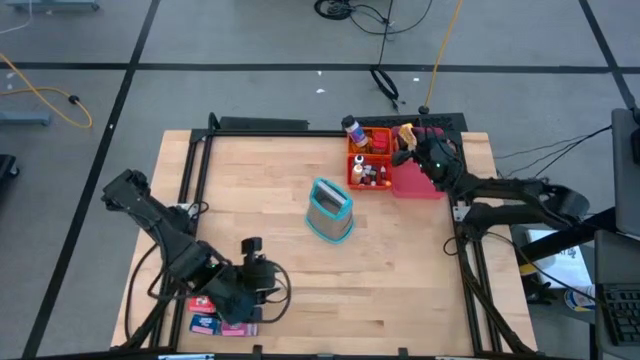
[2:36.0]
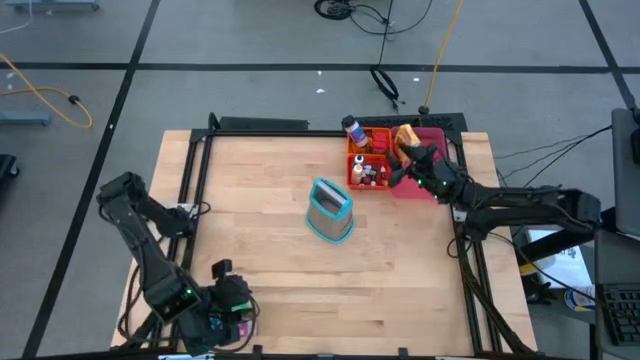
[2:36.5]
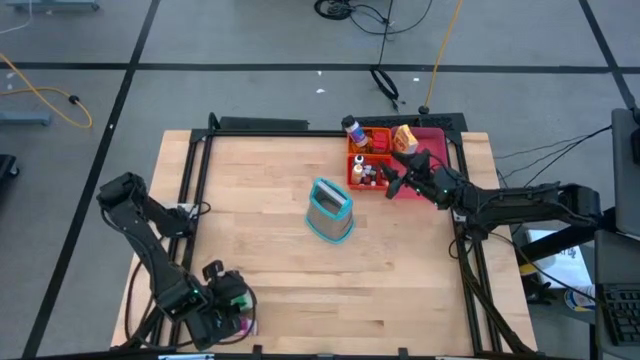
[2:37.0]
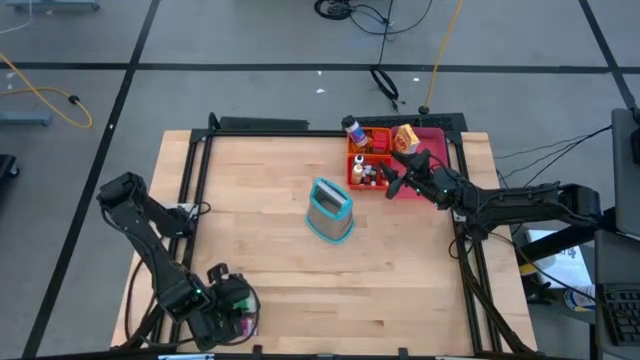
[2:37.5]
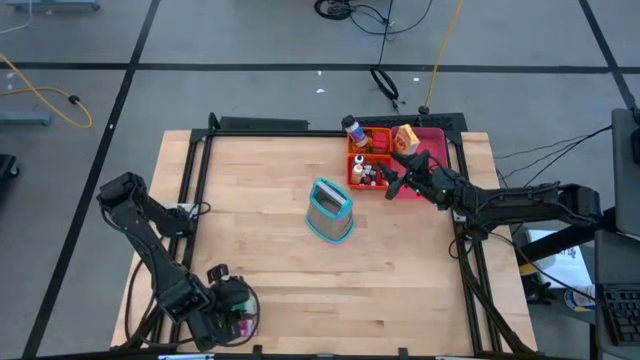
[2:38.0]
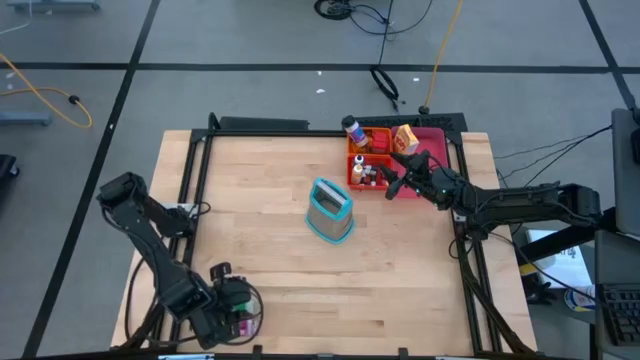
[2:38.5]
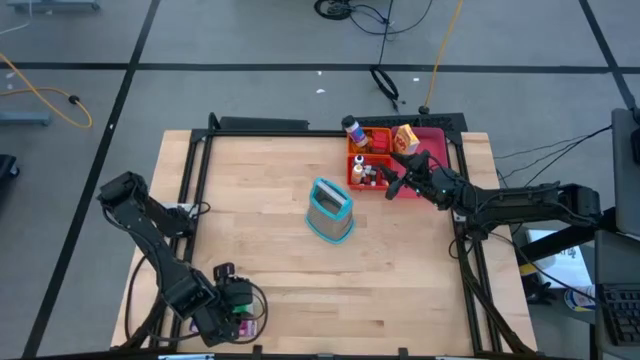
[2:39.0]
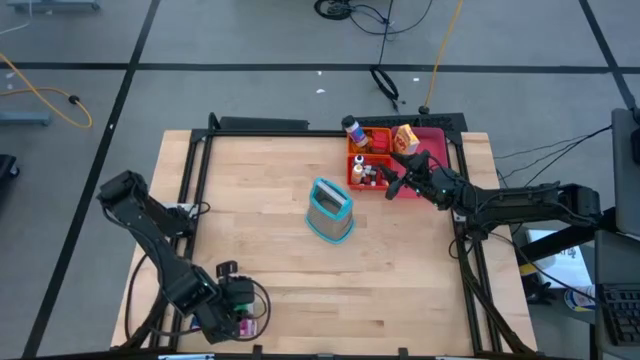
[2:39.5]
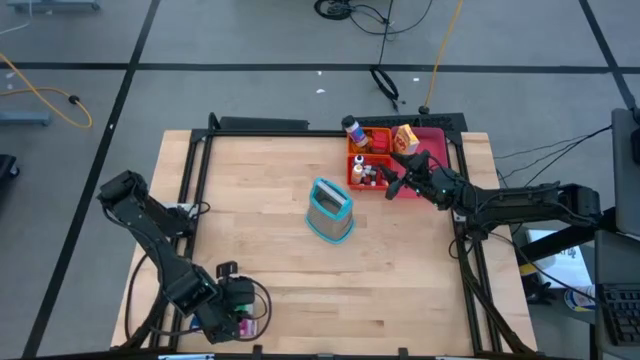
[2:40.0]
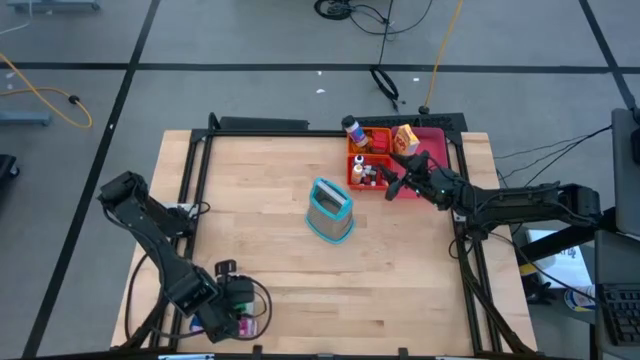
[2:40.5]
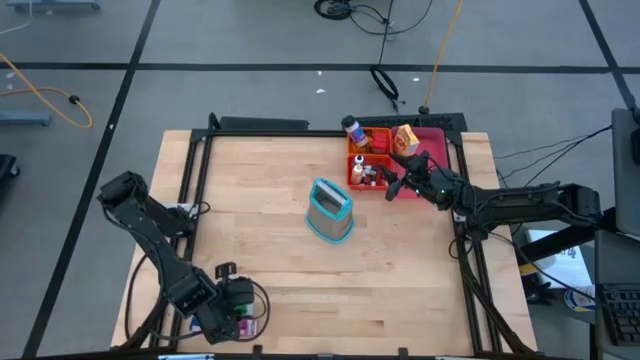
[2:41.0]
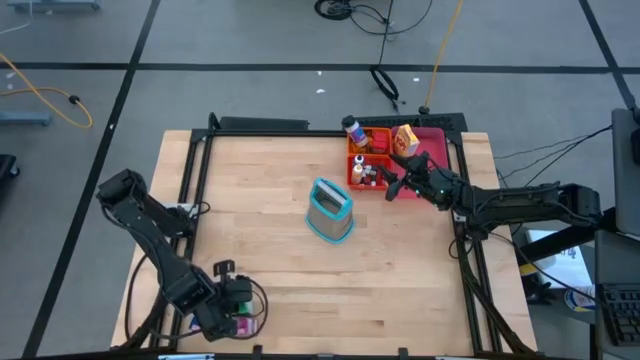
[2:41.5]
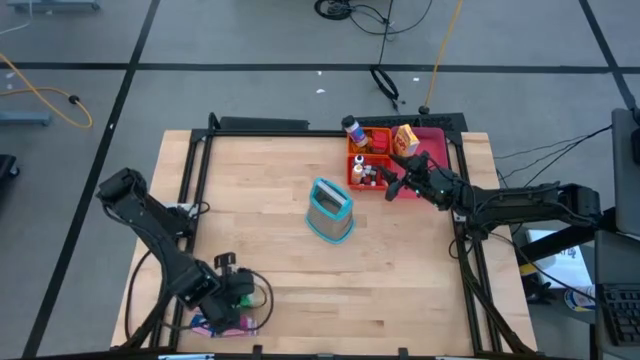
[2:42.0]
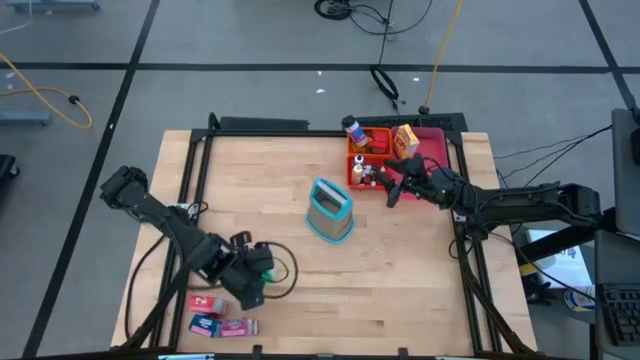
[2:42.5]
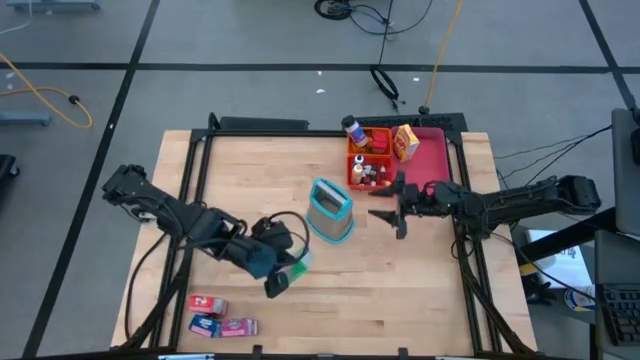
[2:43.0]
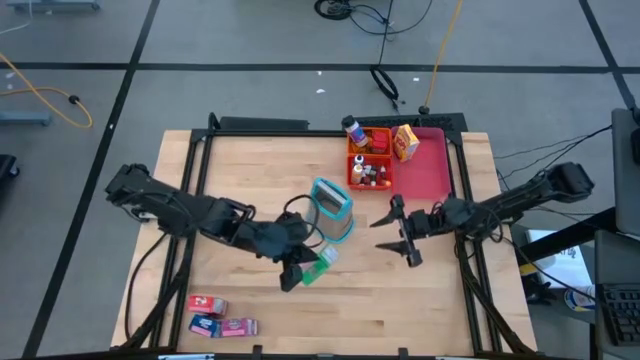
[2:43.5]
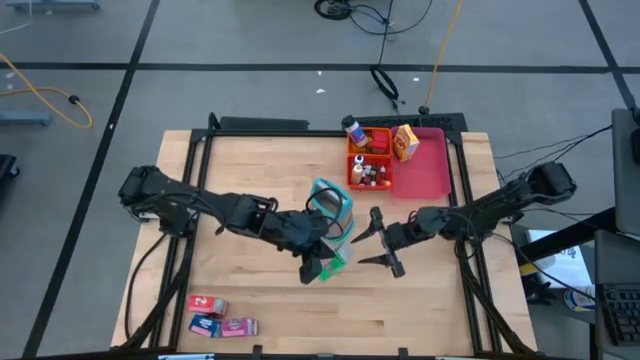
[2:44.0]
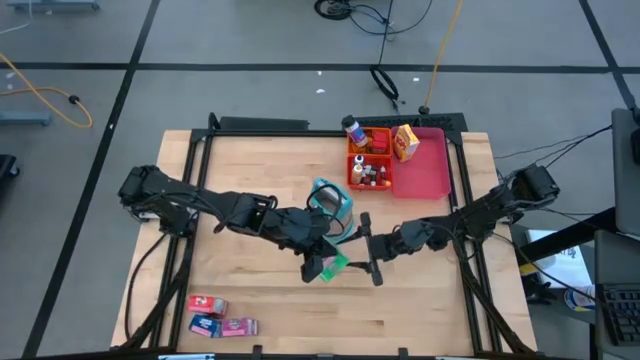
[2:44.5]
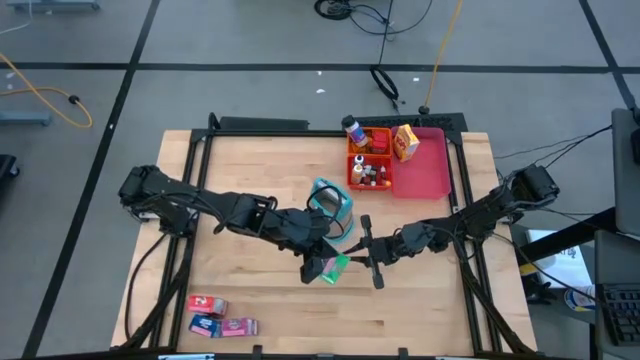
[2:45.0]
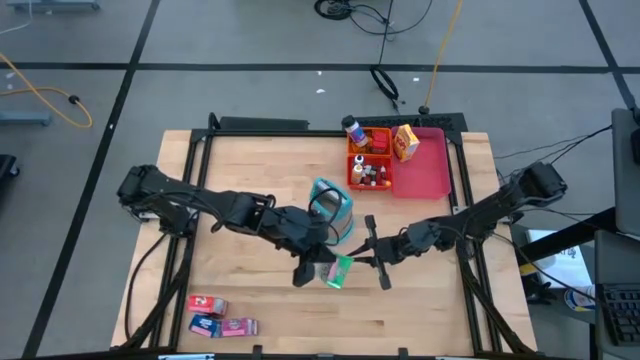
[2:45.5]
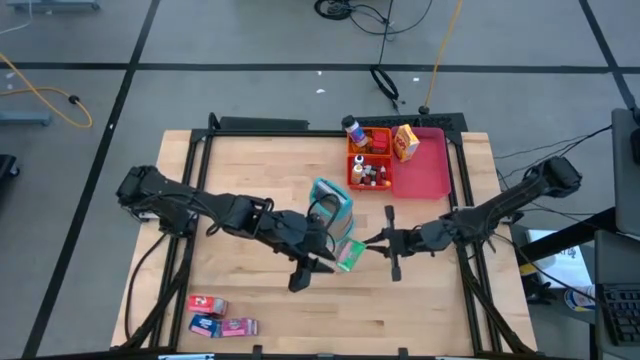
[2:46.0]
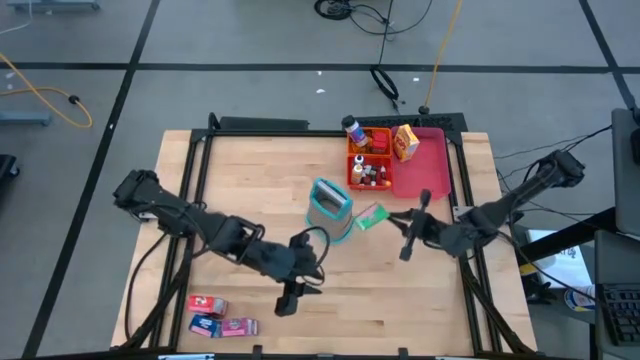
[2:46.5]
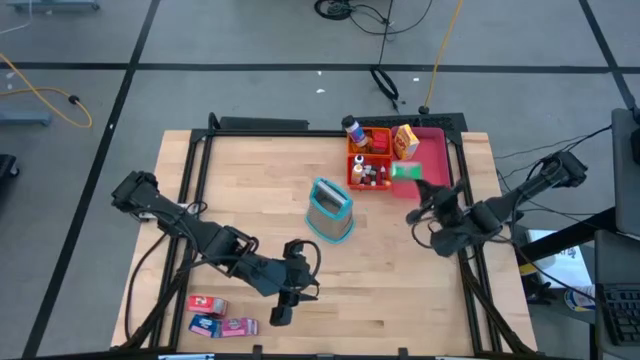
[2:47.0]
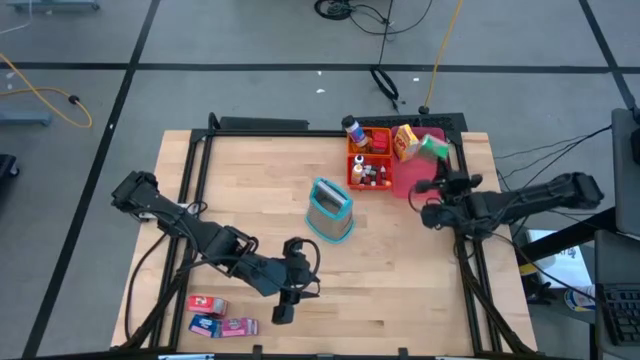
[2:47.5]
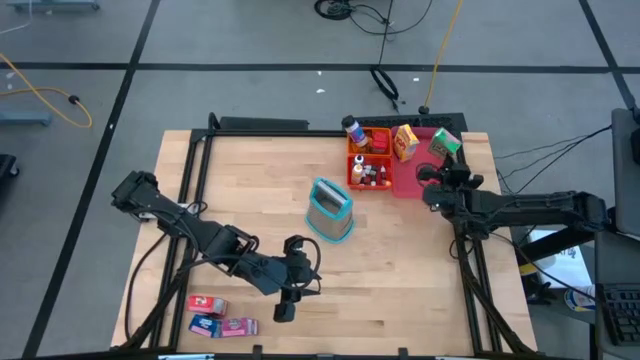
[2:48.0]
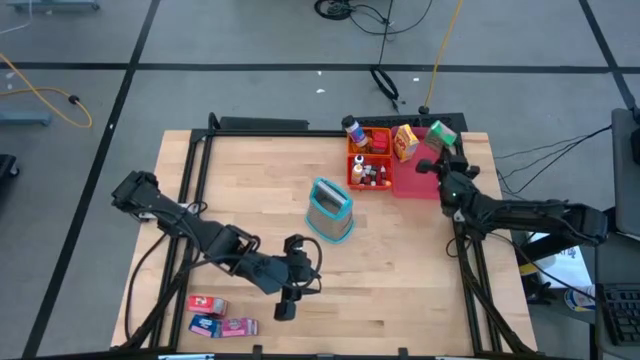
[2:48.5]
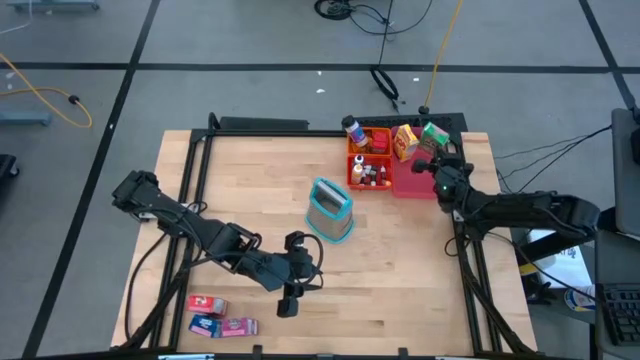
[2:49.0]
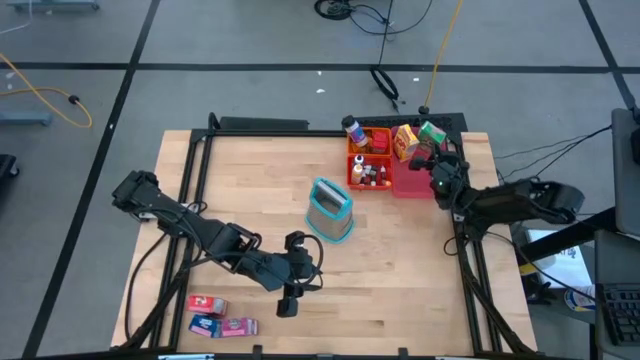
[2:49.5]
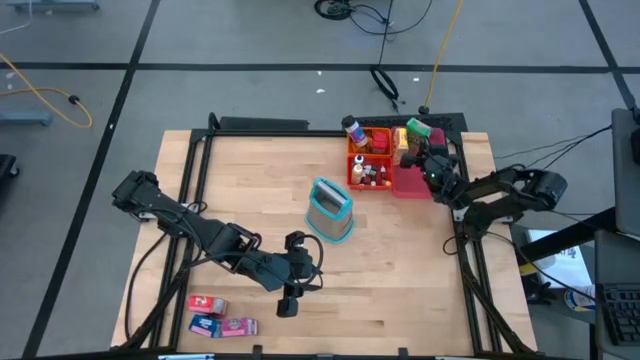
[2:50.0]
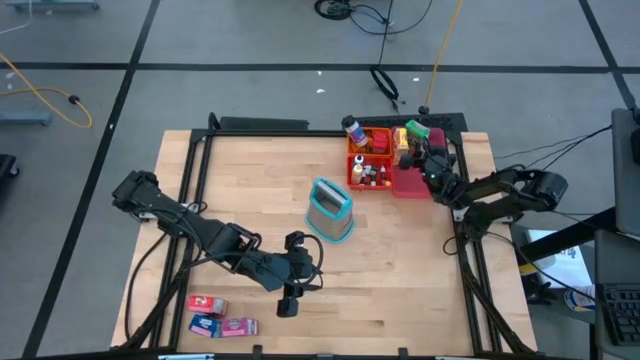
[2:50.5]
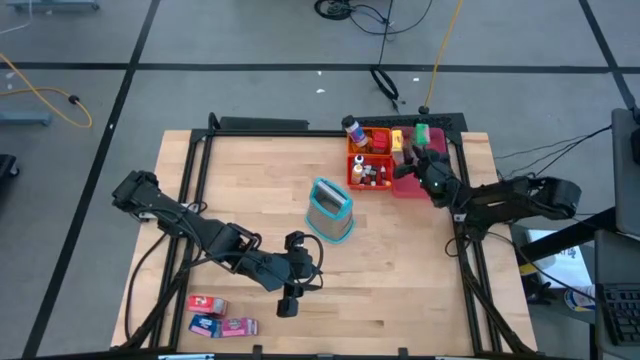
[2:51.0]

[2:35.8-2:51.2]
Task: Pick & Place Kitchen Items
Put the green cereal box into the red bin
